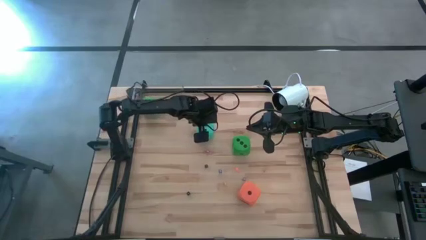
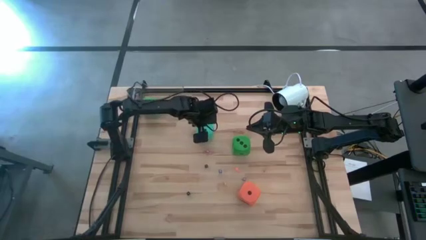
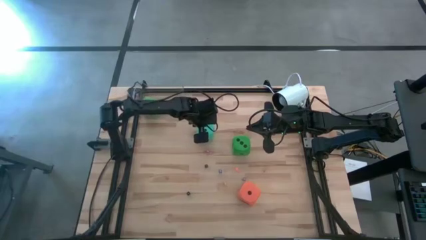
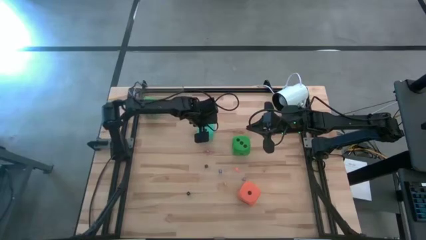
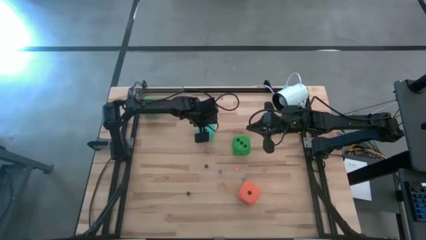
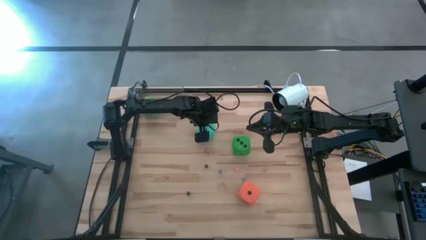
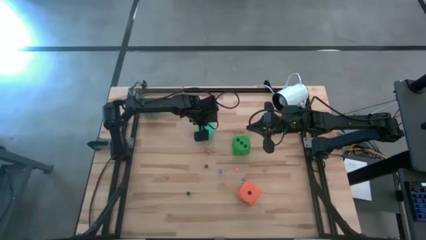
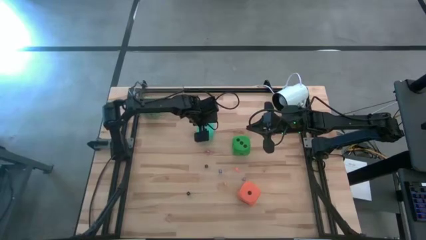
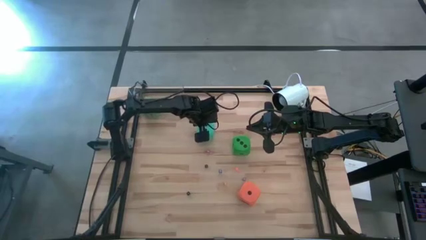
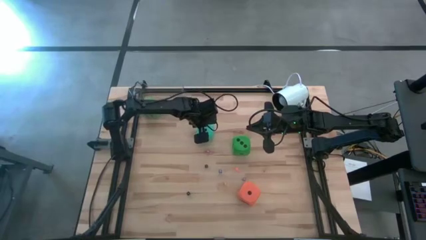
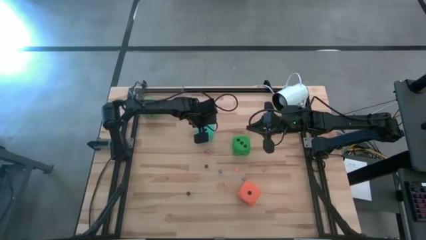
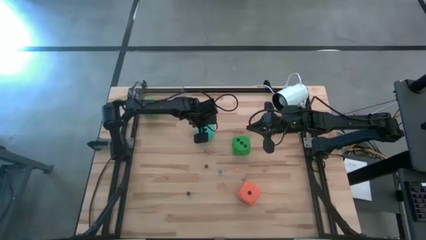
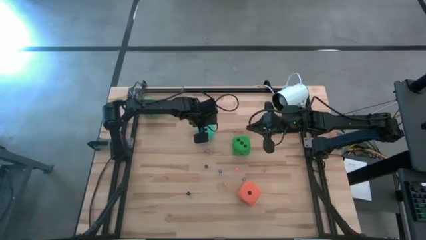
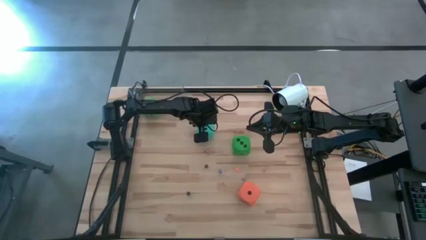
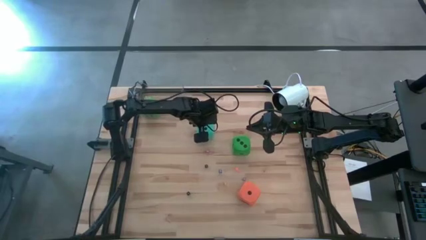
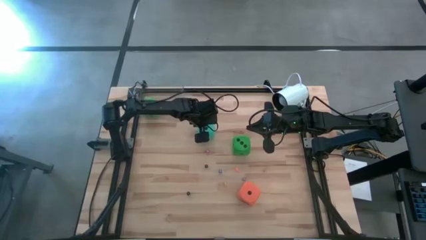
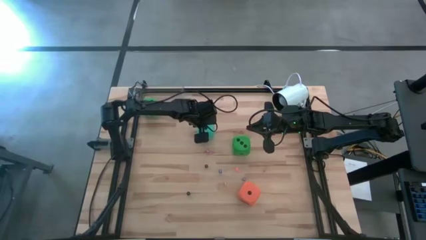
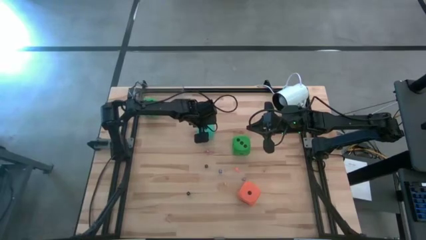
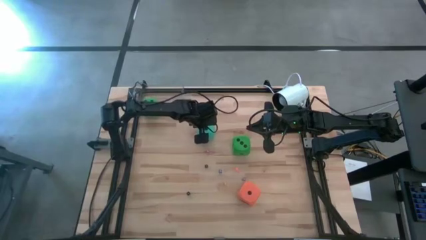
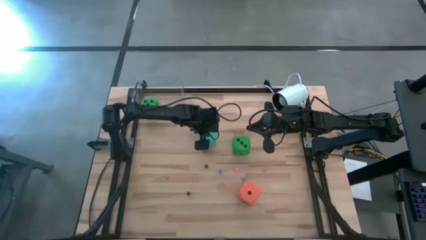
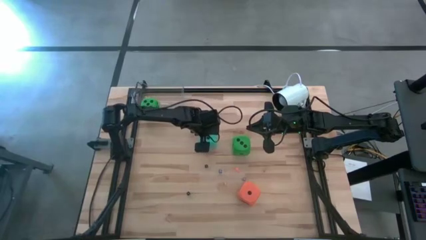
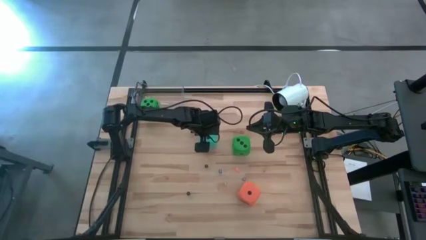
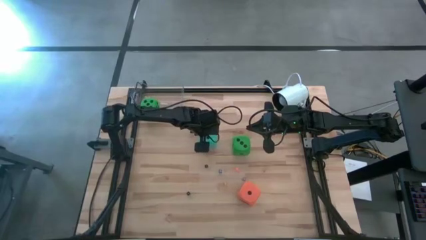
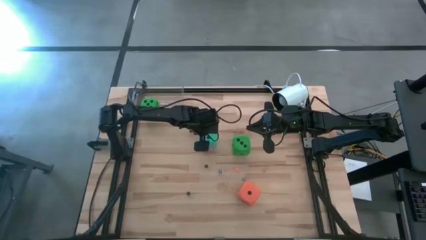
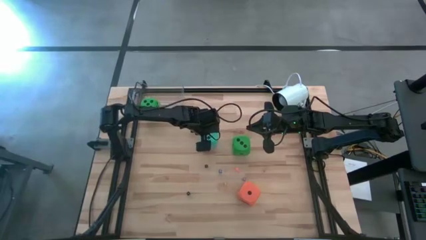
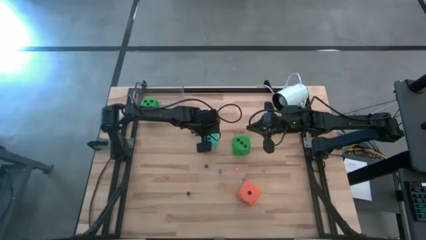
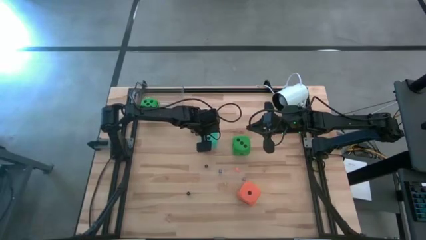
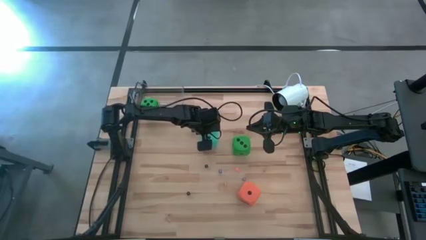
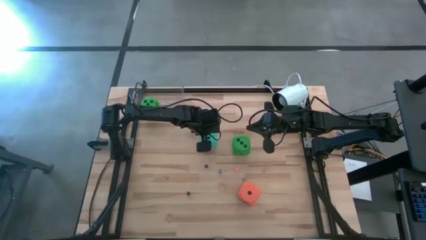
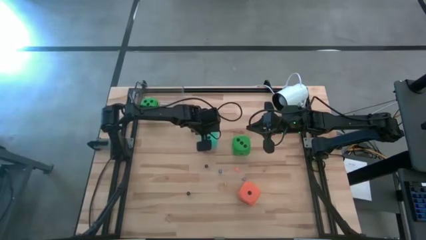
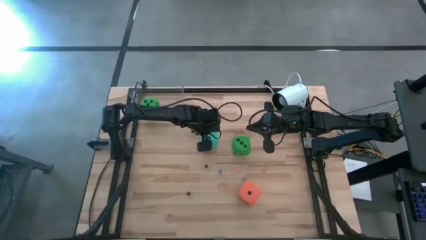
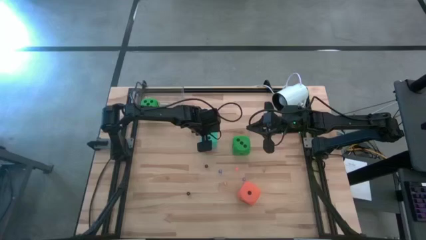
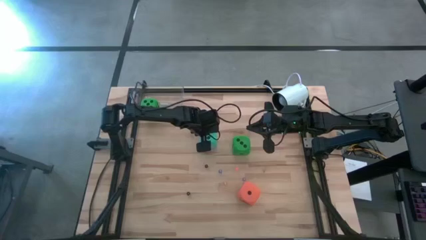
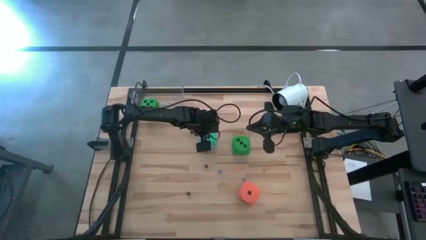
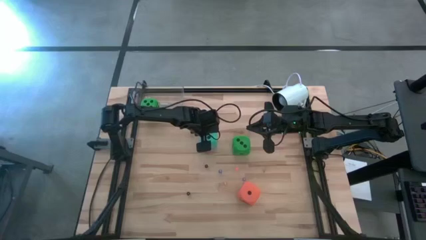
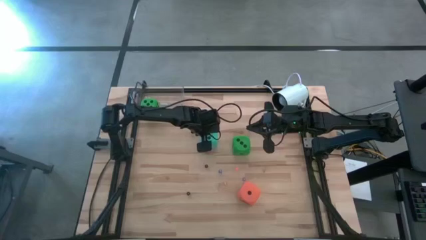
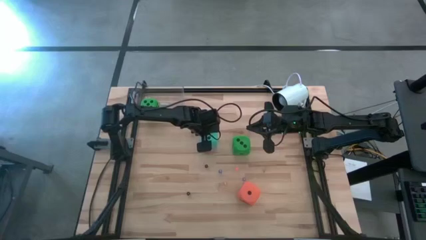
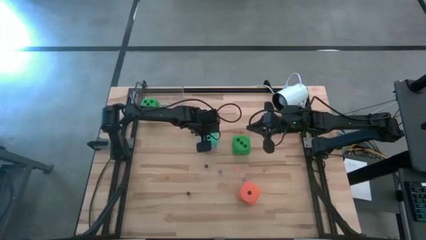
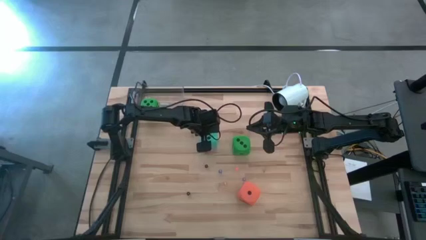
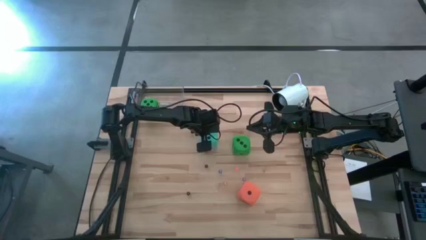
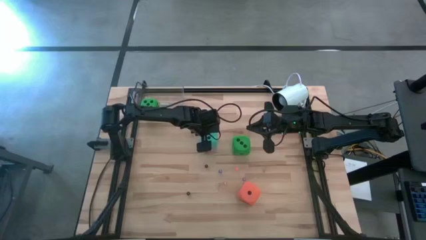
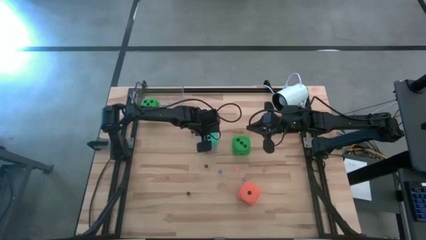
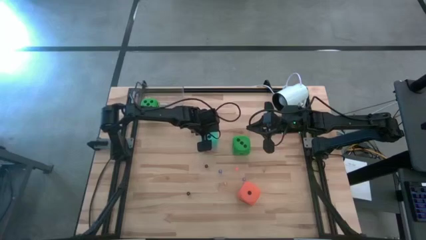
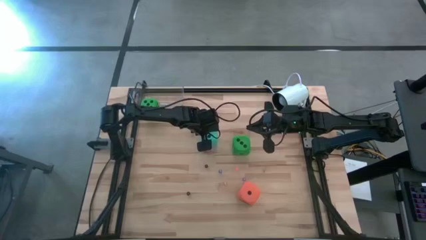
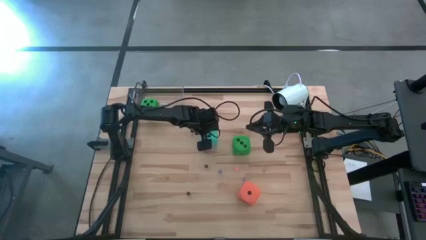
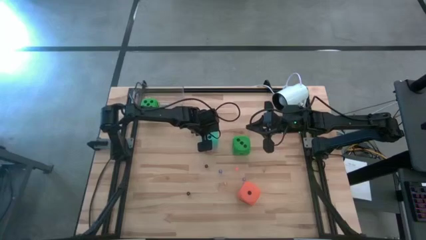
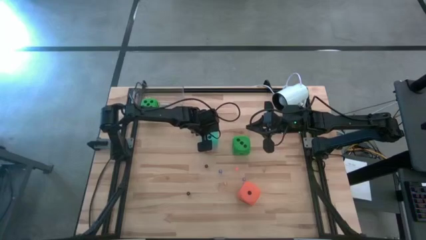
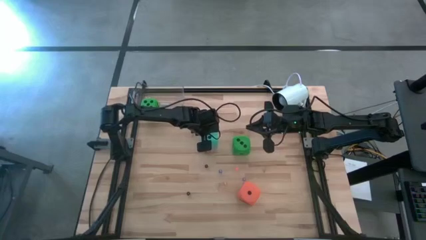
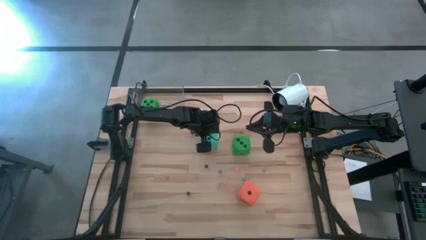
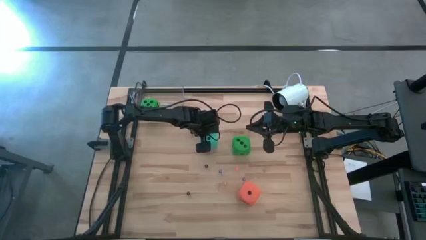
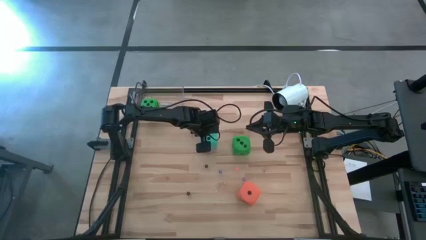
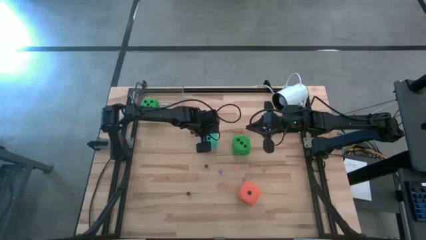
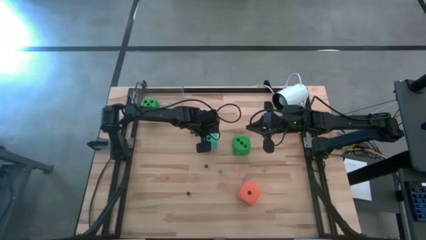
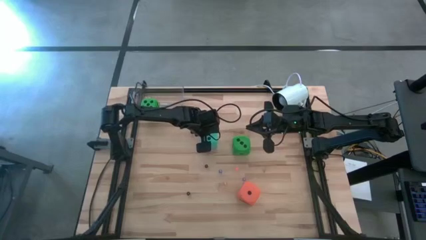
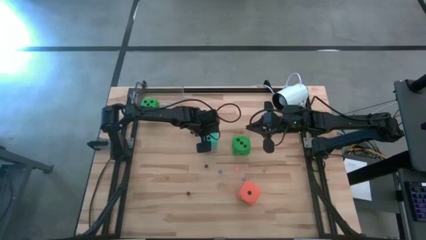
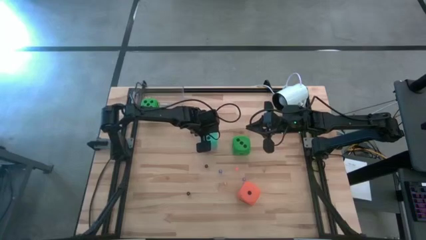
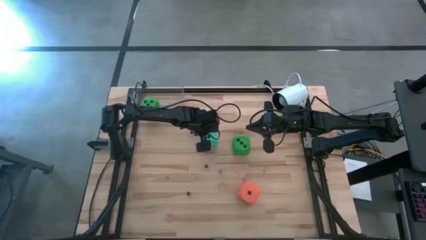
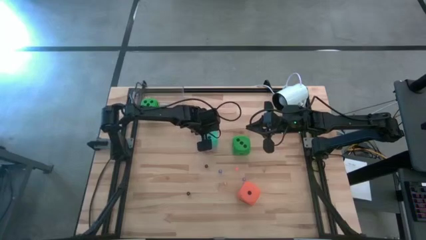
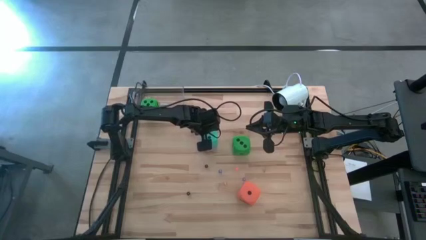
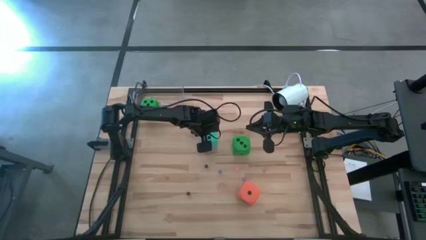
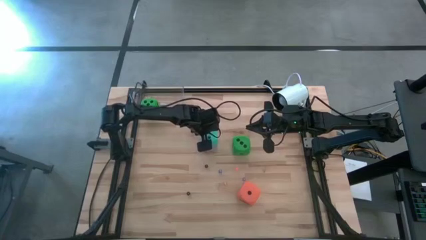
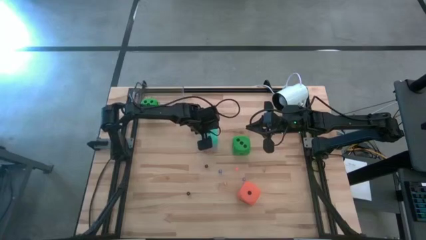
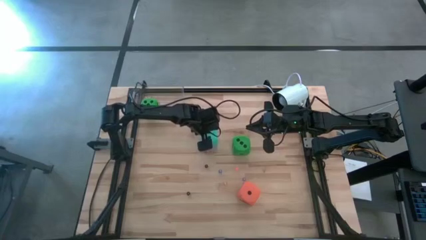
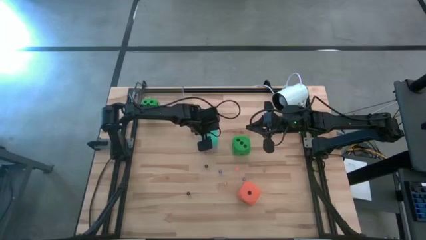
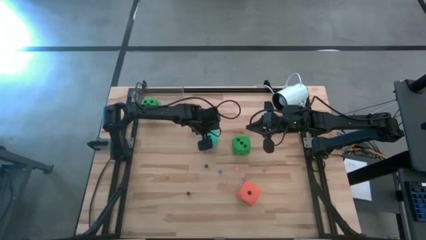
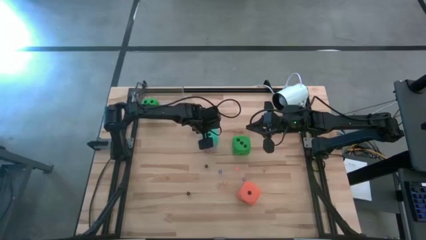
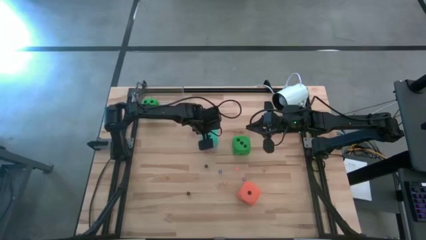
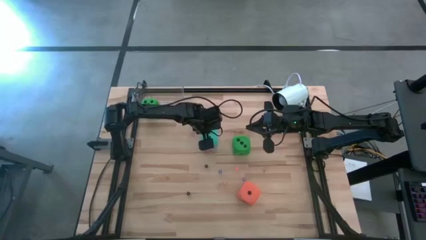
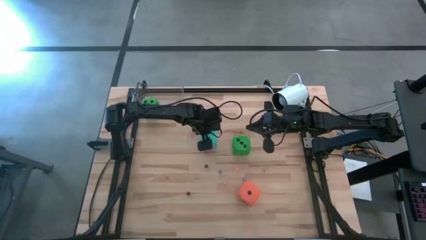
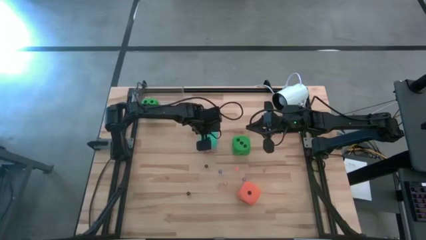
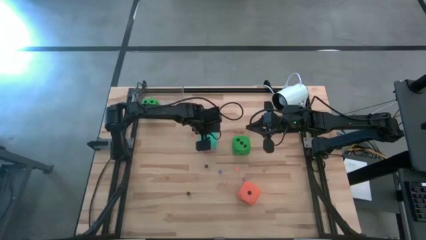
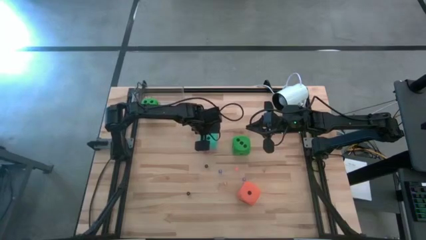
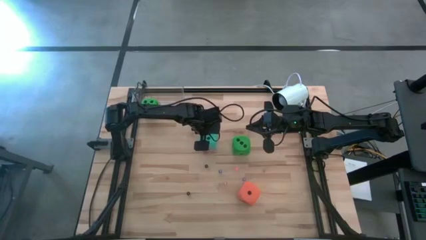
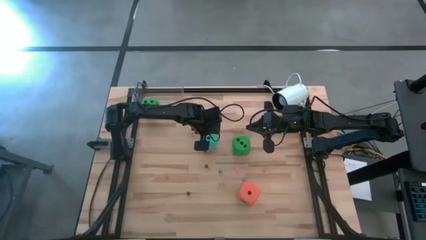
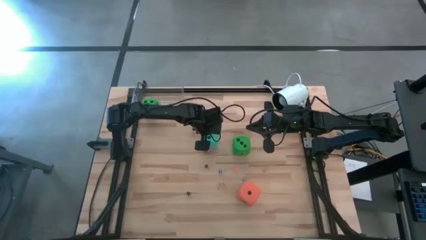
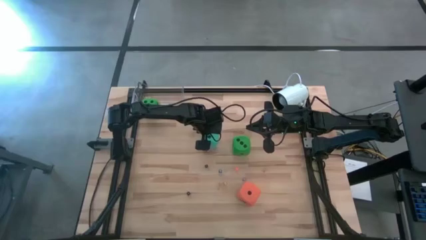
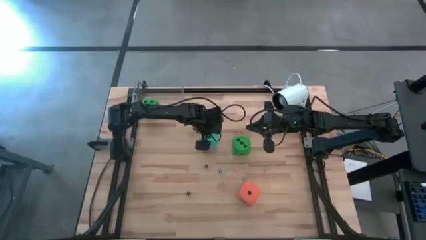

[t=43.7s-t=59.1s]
Task: Pick & Place Dice
Put the large blue die into the transparent bin
